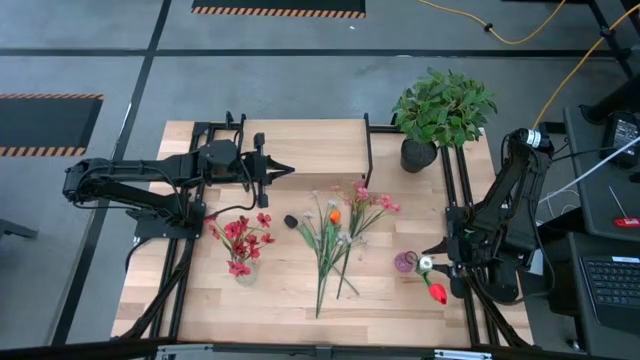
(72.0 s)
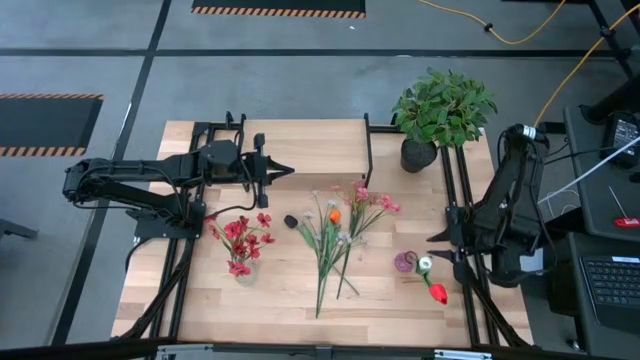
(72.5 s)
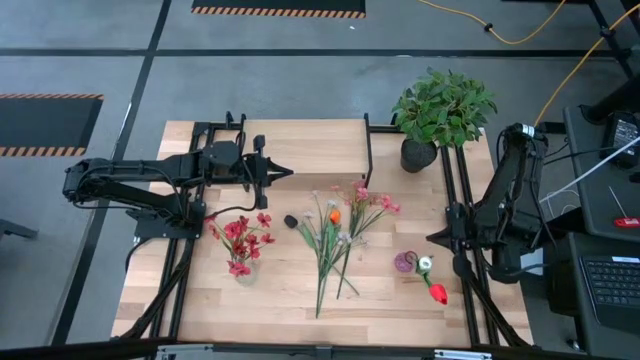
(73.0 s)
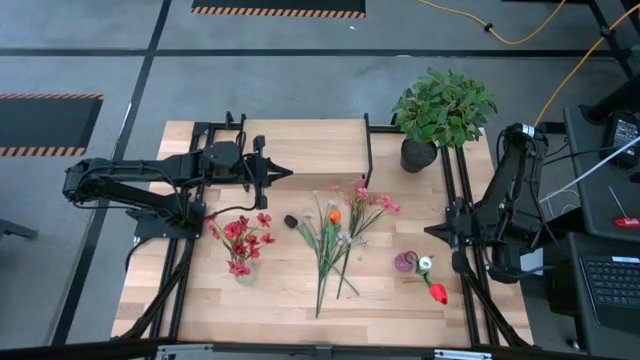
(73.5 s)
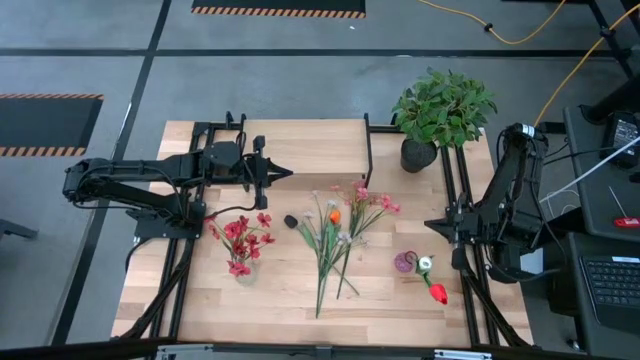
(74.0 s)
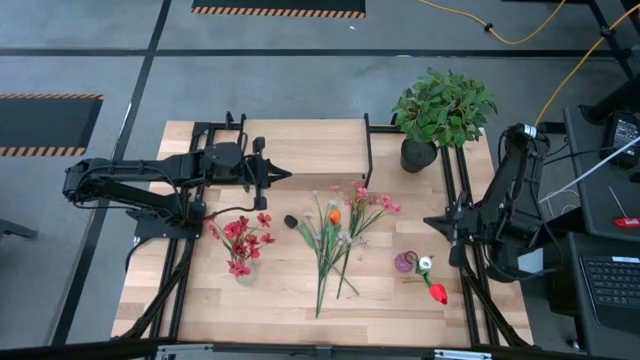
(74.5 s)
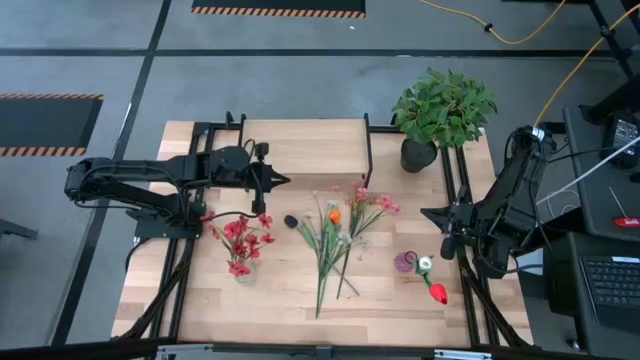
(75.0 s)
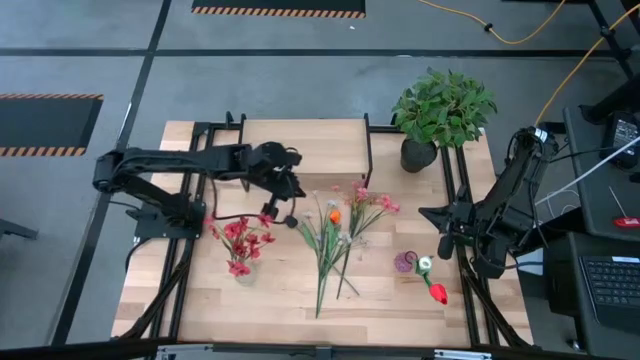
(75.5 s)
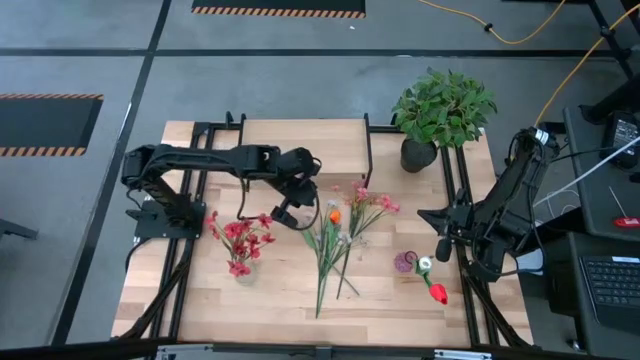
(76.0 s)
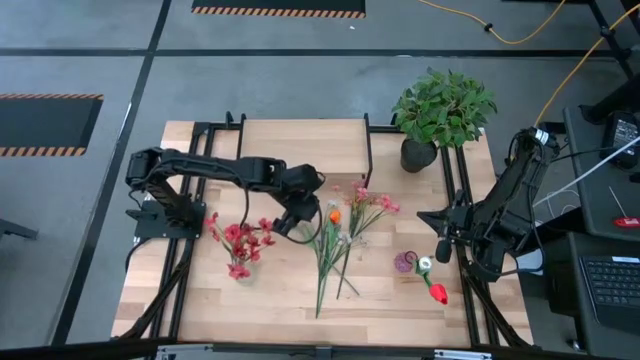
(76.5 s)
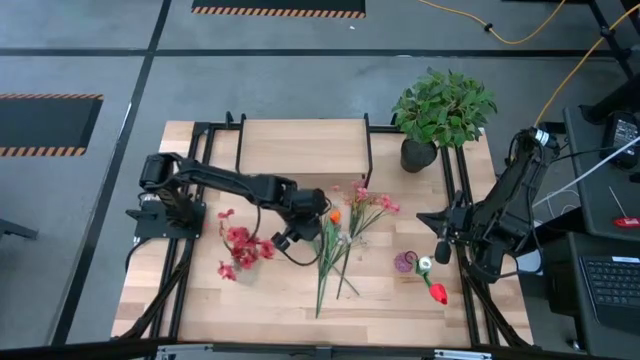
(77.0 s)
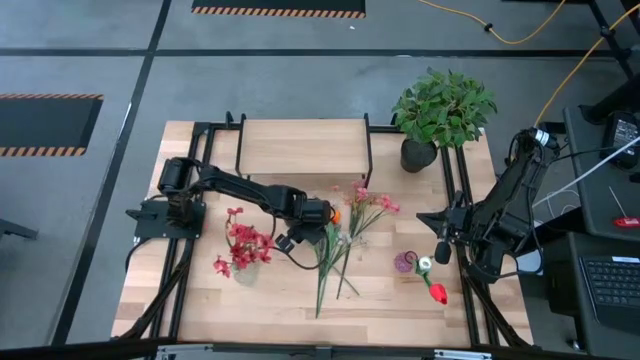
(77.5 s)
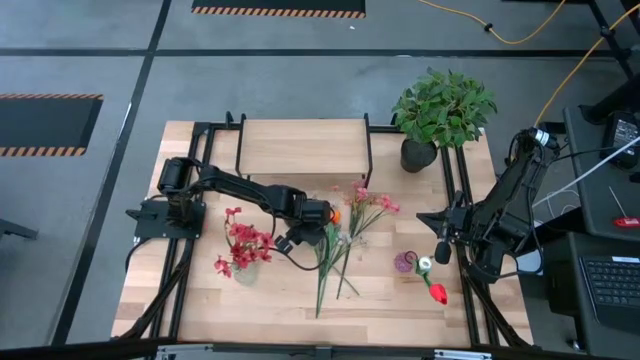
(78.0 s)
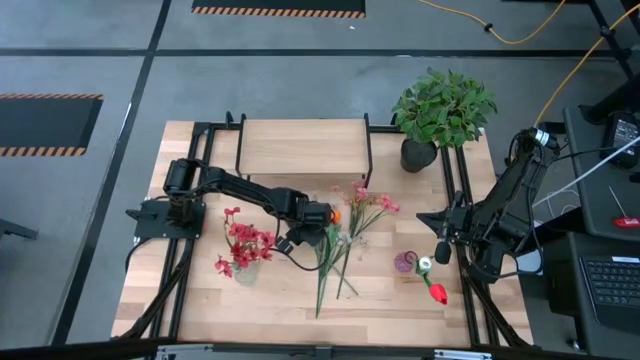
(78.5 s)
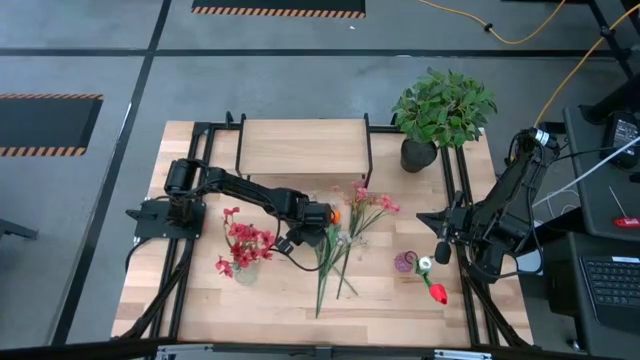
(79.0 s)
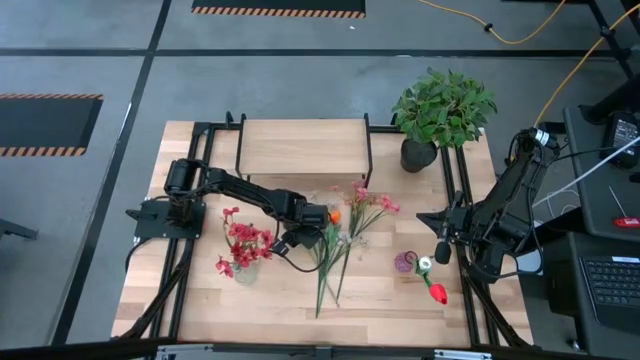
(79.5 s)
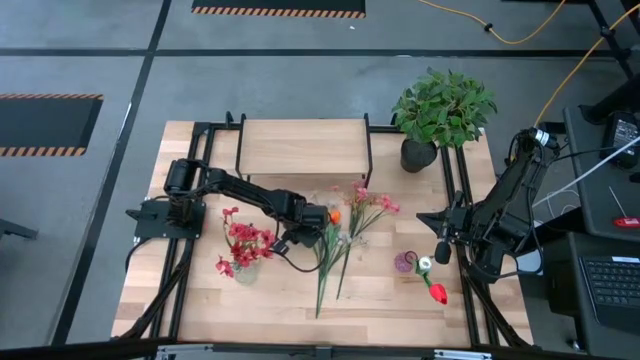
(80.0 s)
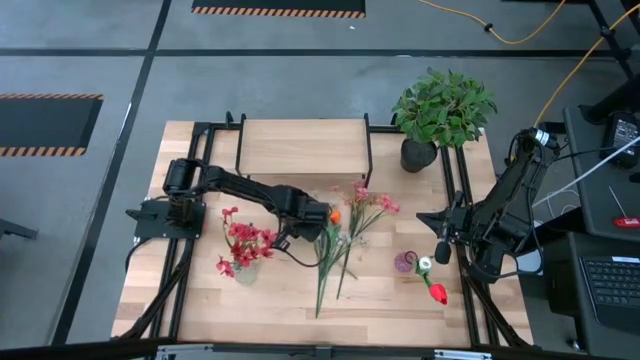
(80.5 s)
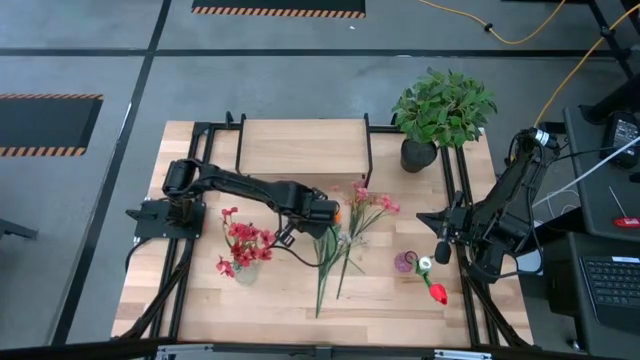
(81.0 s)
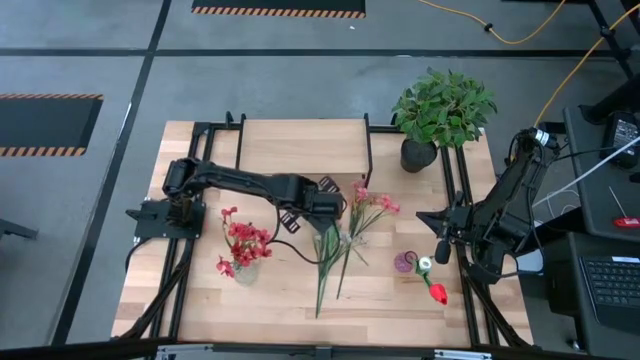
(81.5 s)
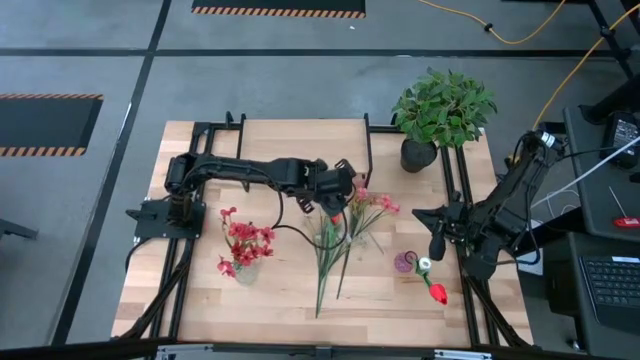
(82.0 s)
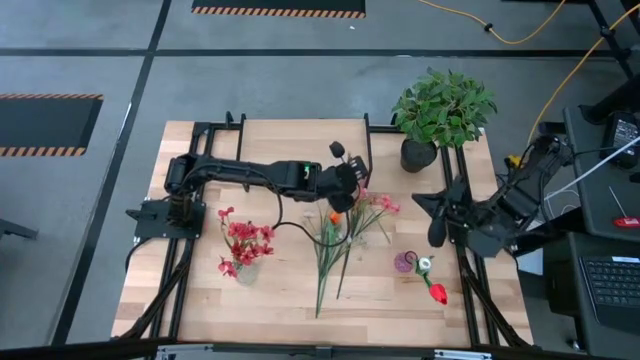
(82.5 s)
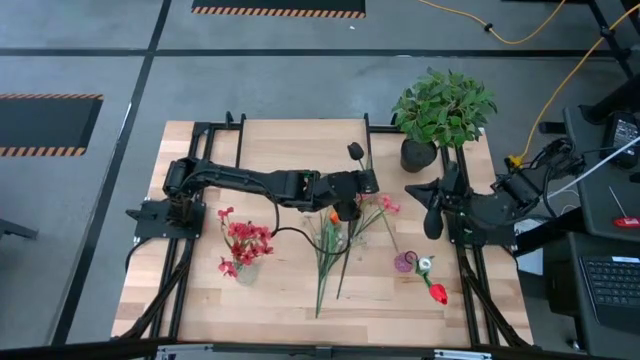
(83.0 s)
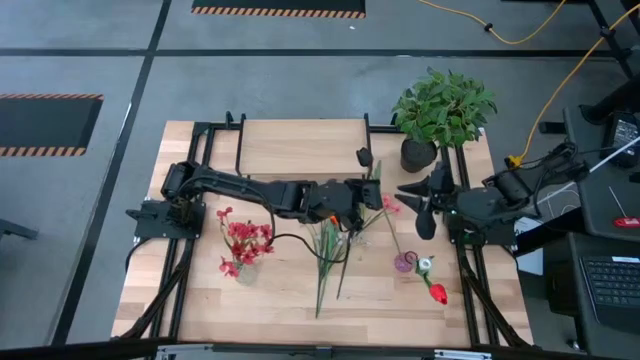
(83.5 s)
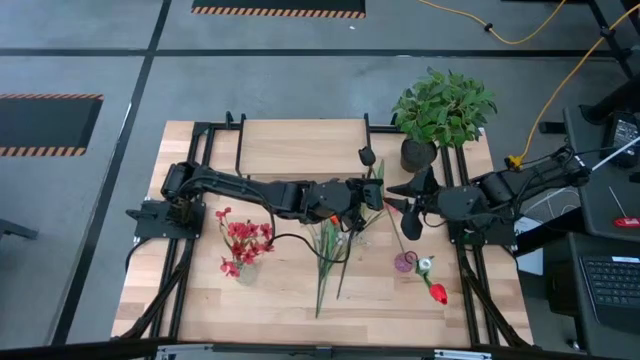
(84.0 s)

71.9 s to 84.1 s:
Task: Pick and place flowers into a vace then onto a shelf
Put the black flower into the pink vase

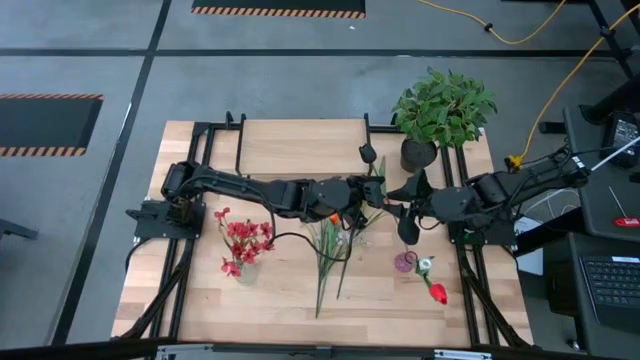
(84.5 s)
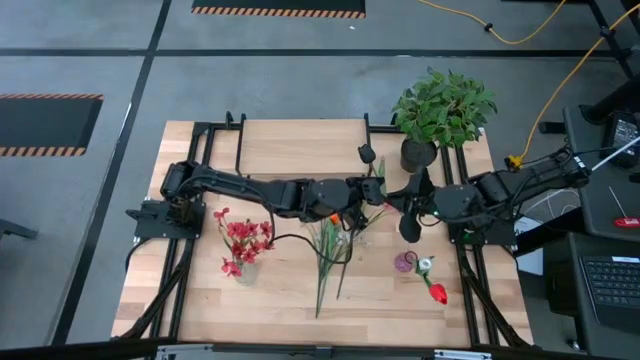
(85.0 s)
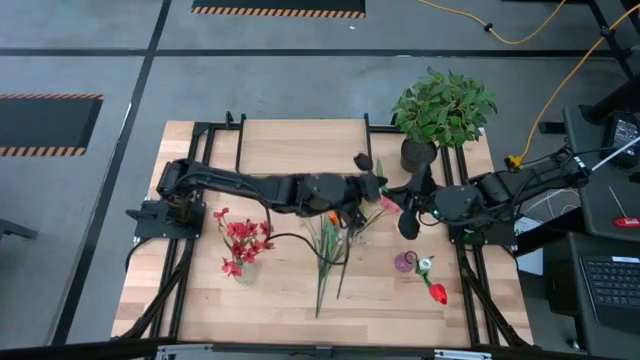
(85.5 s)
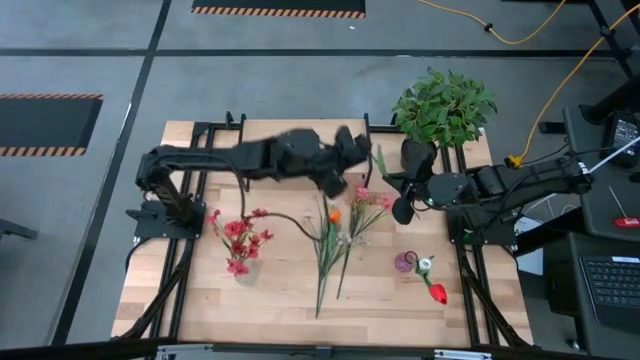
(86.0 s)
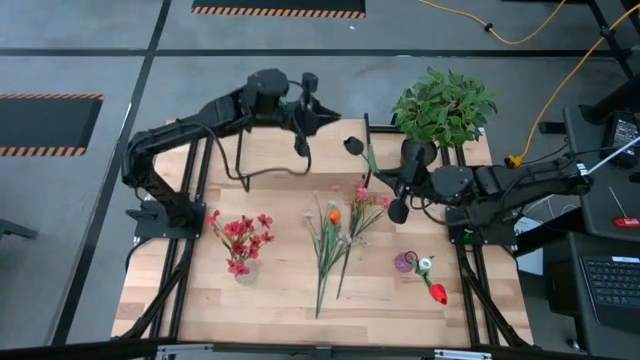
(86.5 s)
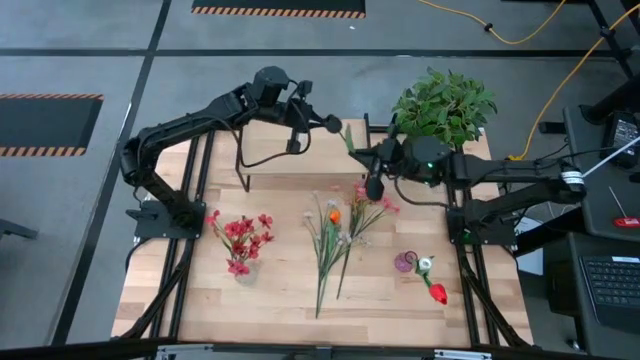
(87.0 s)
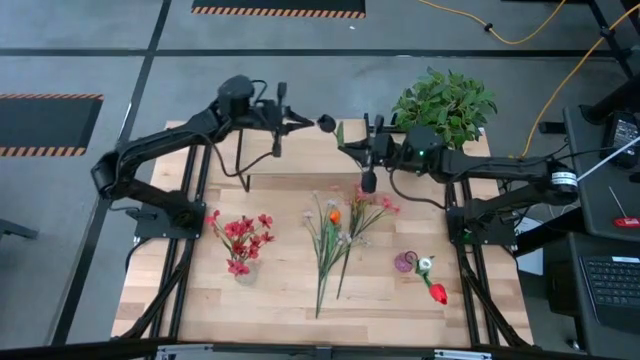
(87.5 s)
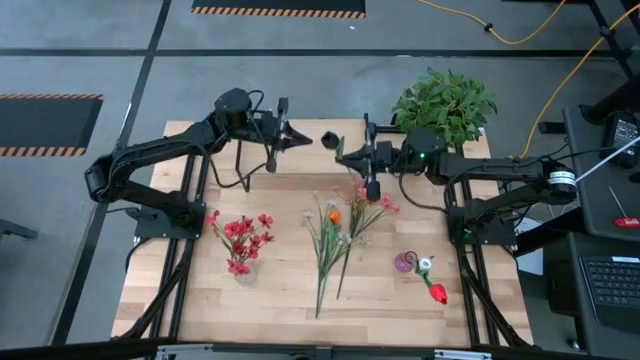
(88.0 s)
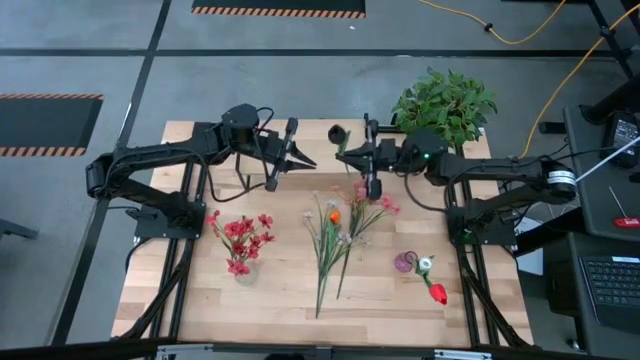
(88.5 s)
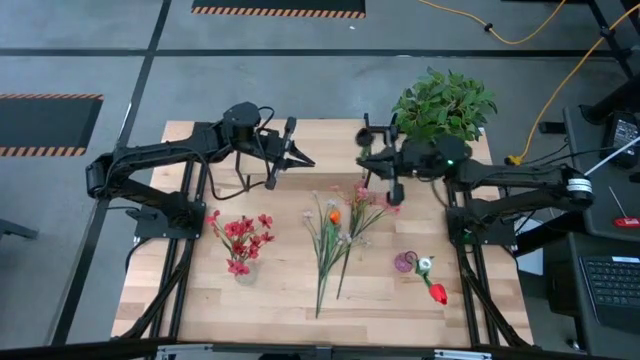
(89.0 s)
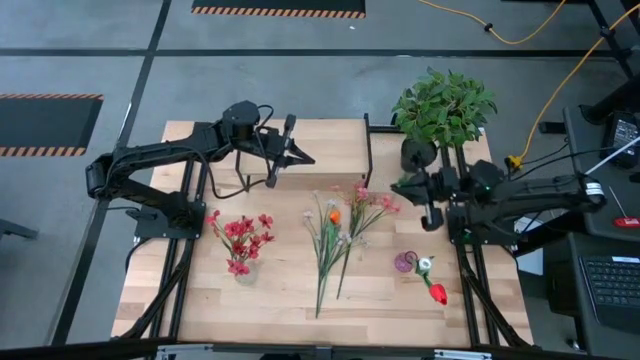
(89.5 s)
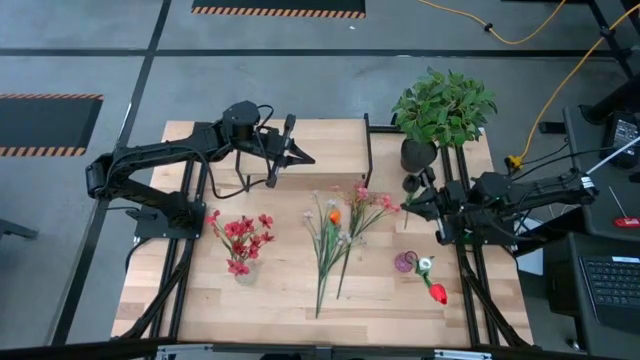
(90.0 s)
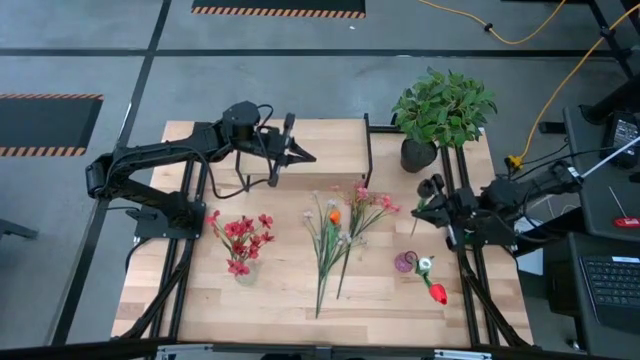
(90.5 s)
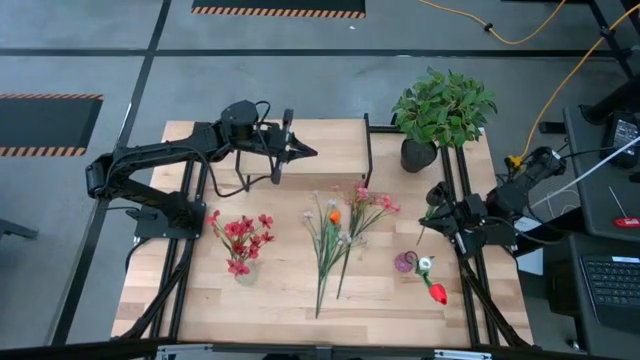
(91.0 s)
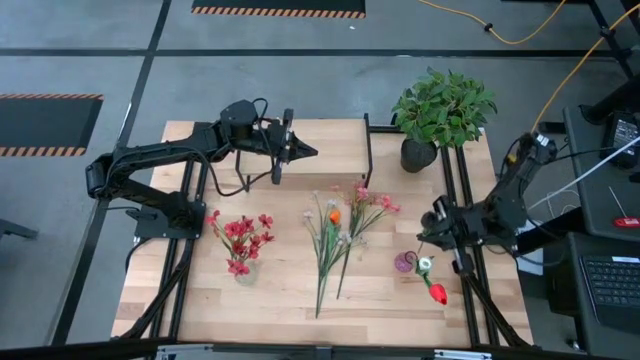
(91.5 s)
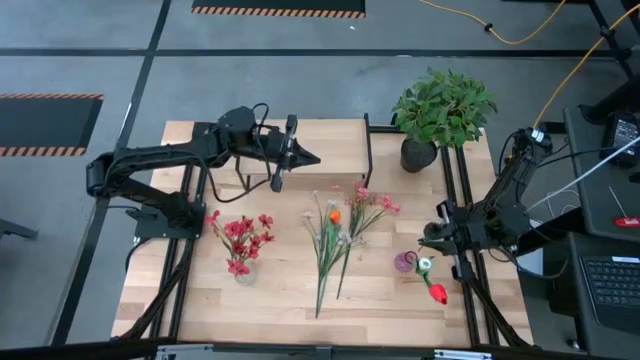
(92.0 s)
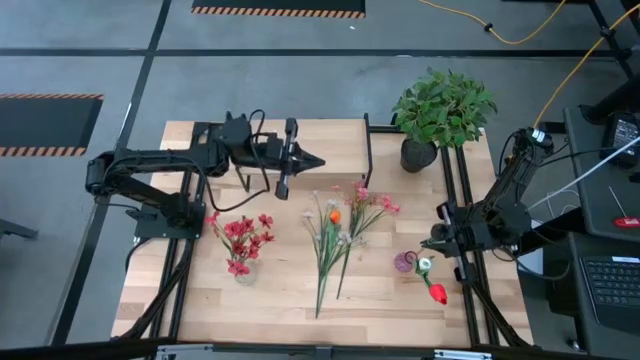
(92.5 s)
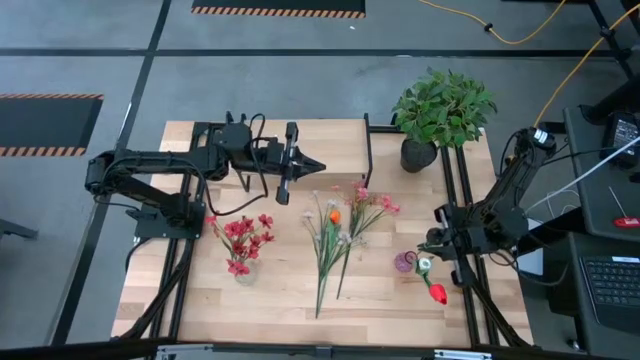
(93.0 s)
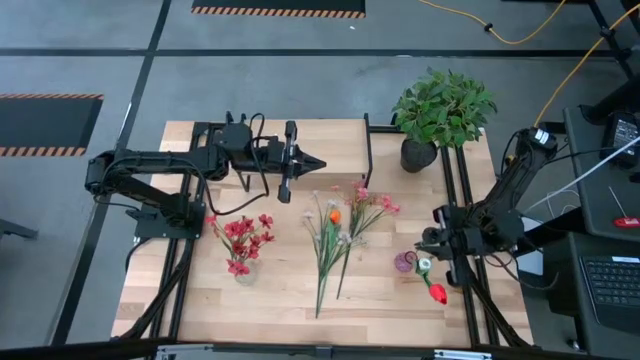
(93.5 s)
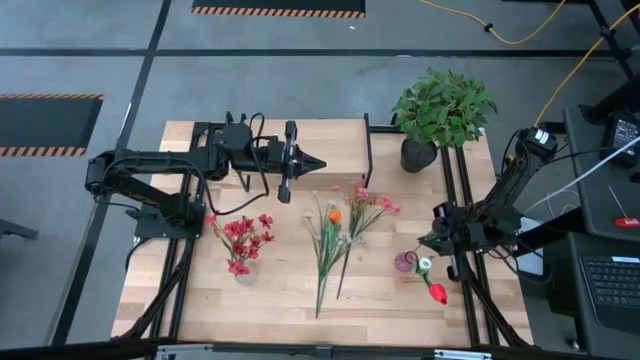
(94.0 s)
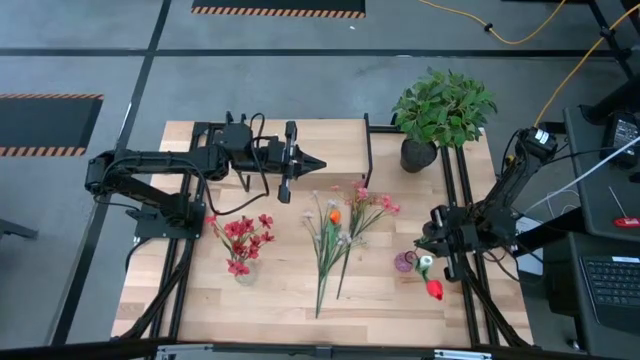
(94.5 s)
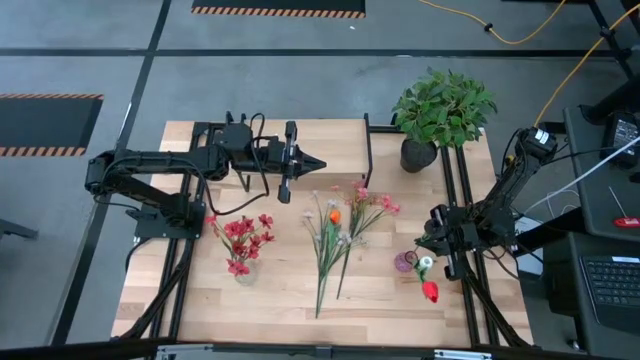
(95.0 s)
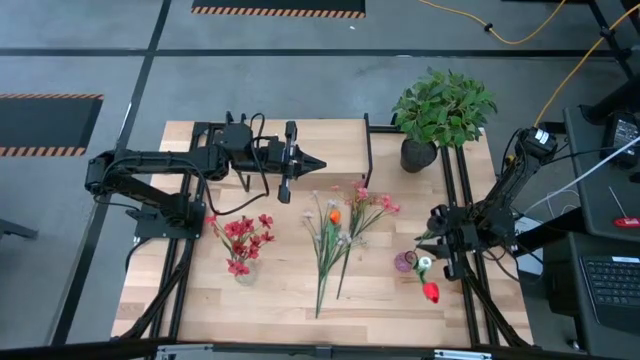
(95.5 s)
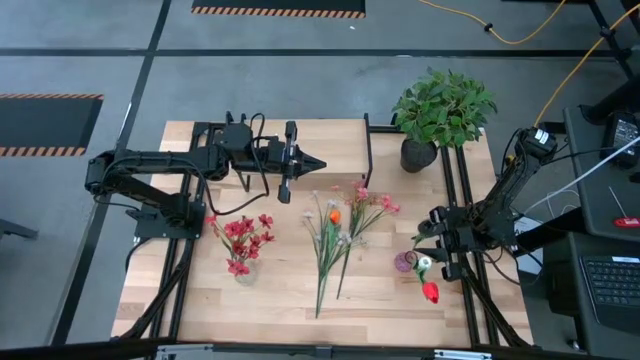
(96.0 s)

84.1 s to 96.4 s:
Put the black flower into the pink vase
